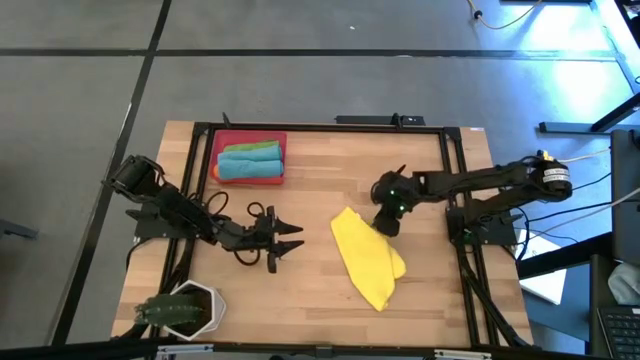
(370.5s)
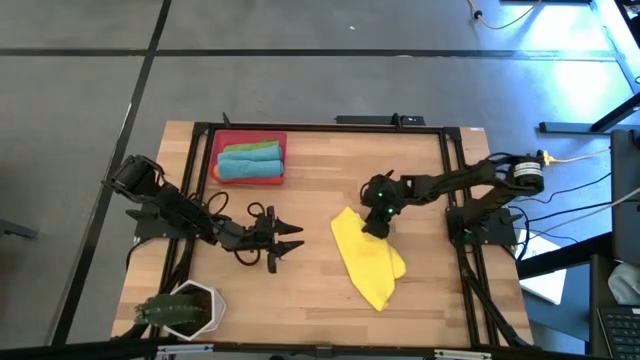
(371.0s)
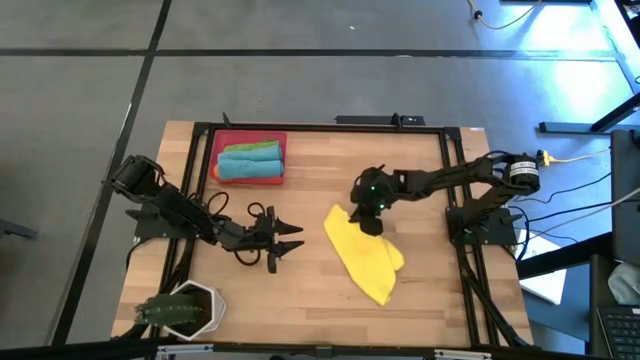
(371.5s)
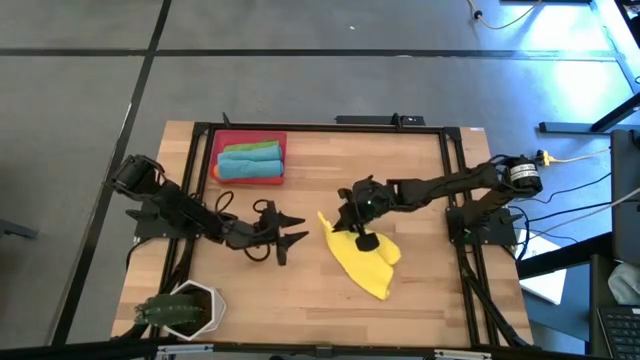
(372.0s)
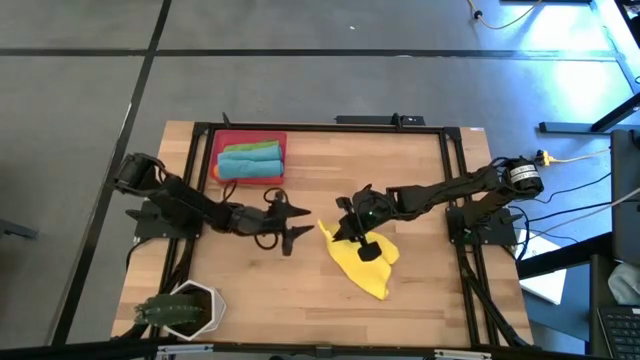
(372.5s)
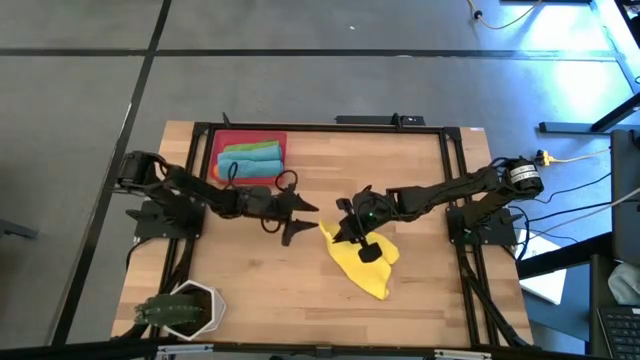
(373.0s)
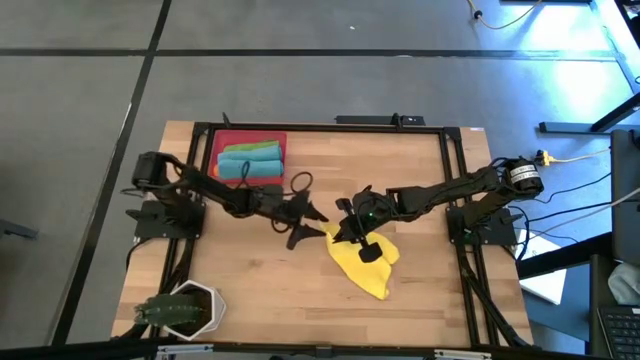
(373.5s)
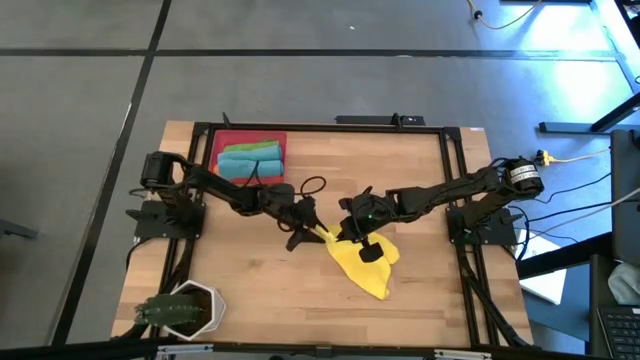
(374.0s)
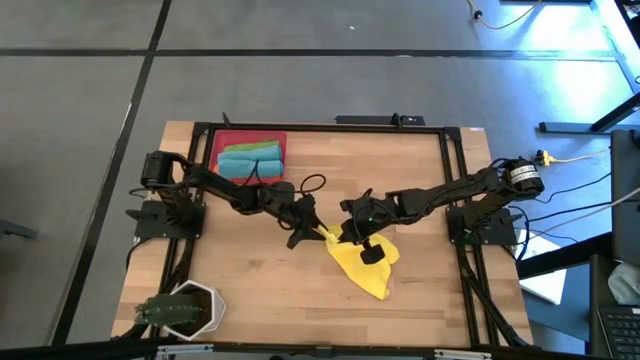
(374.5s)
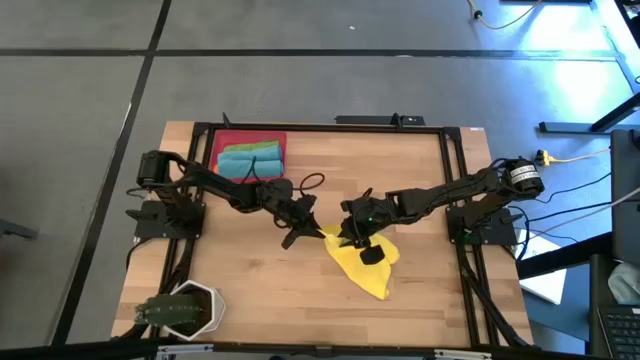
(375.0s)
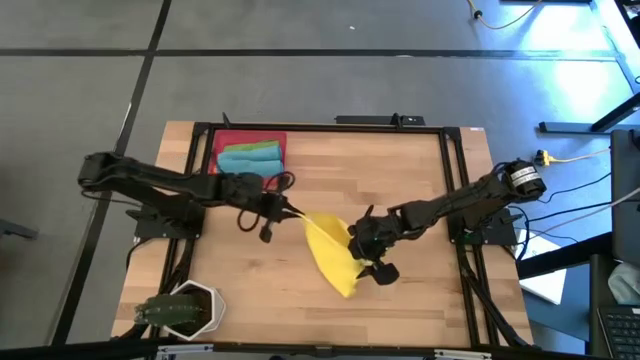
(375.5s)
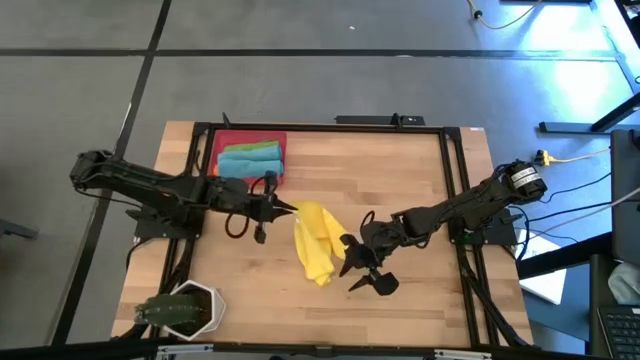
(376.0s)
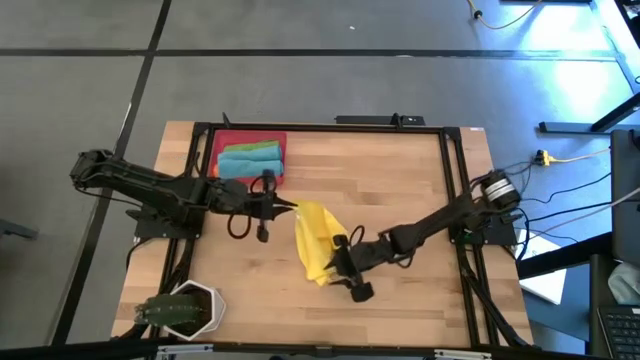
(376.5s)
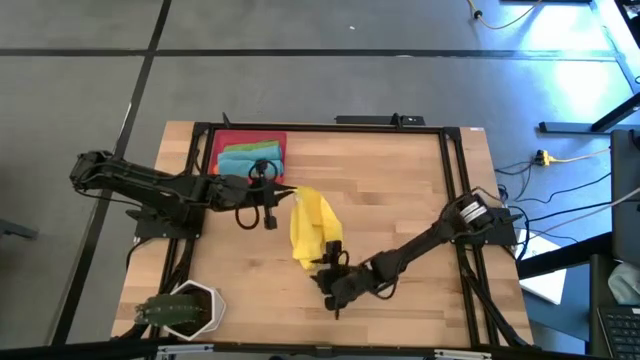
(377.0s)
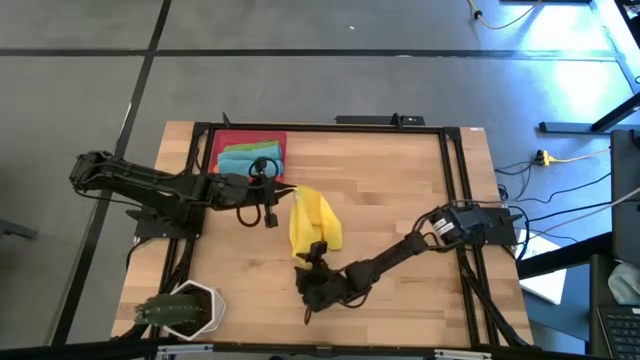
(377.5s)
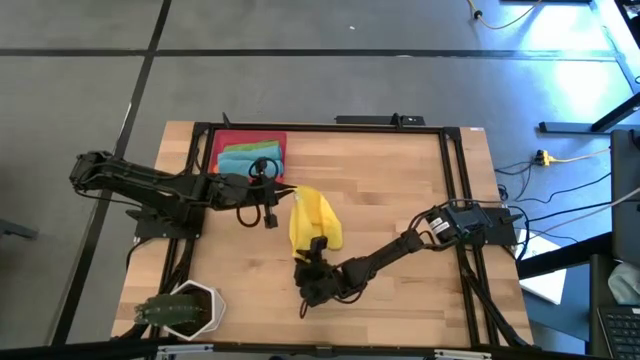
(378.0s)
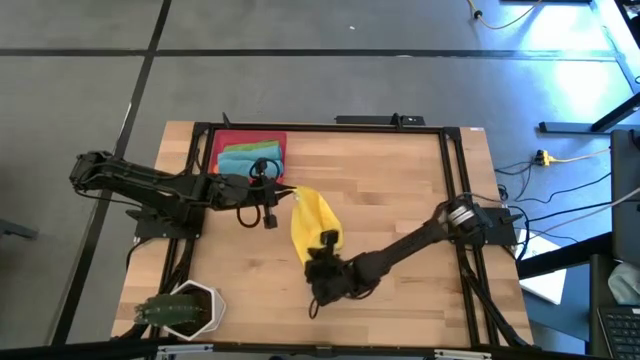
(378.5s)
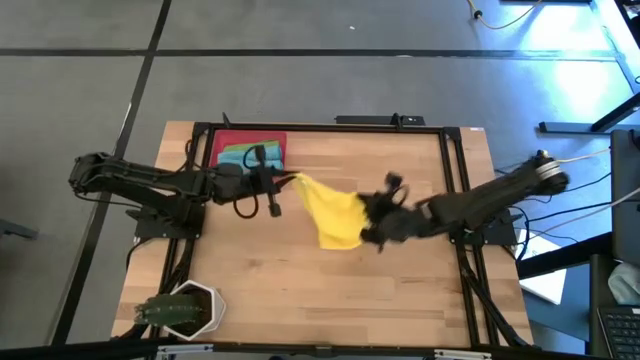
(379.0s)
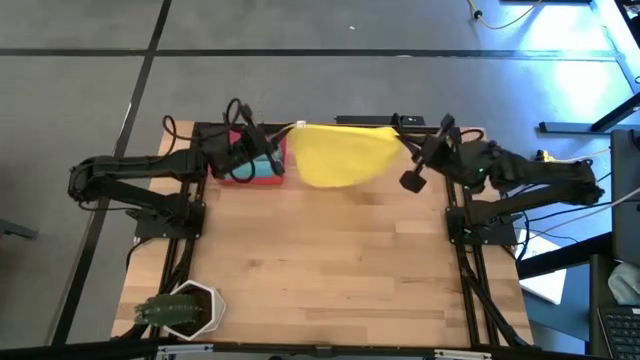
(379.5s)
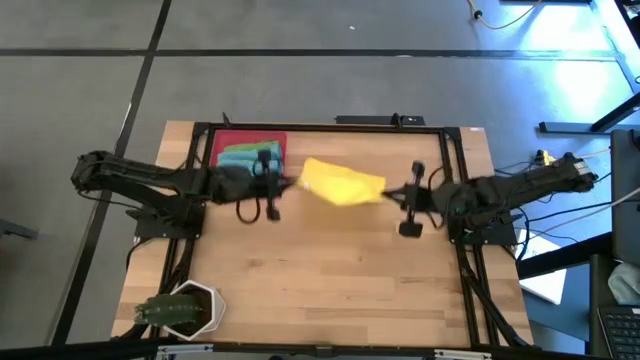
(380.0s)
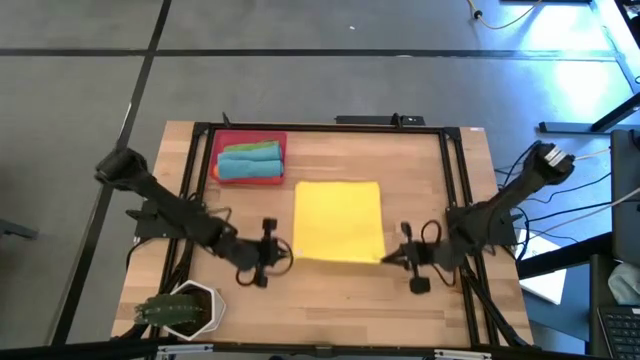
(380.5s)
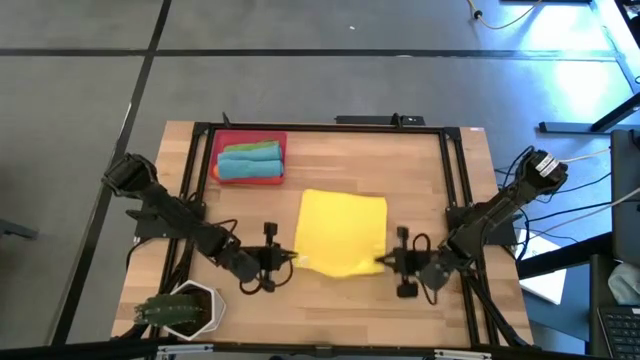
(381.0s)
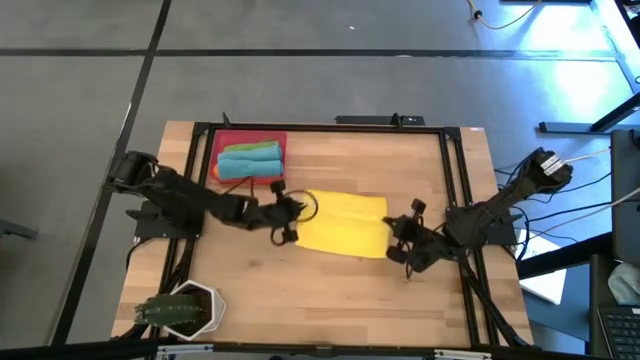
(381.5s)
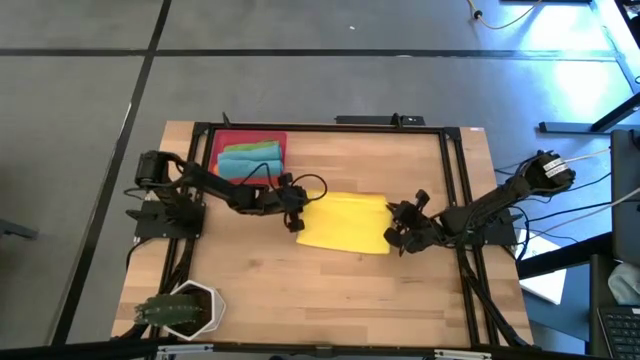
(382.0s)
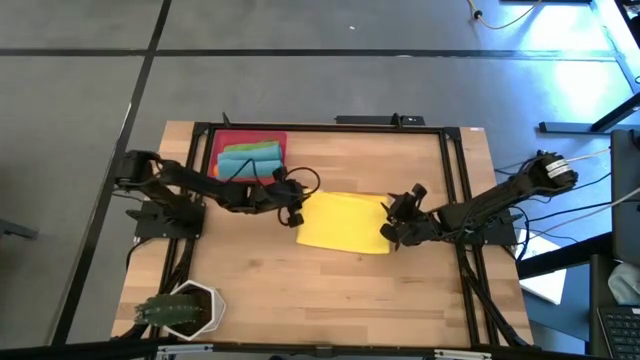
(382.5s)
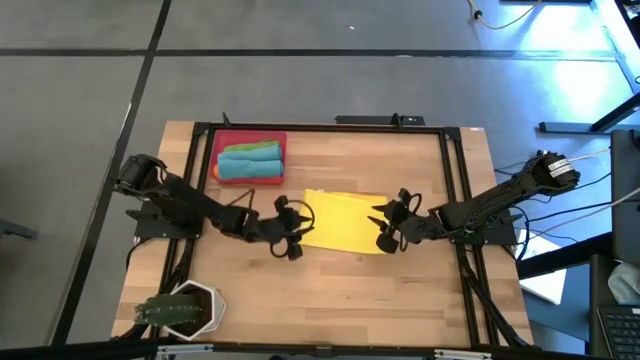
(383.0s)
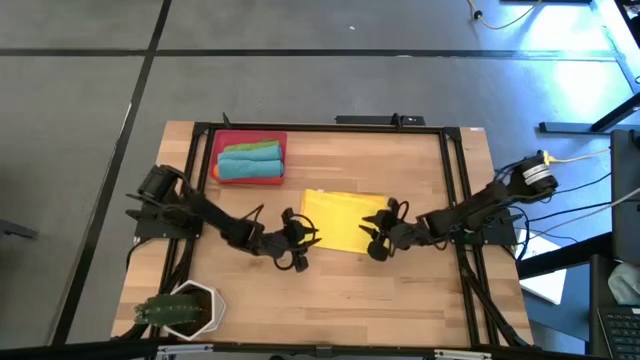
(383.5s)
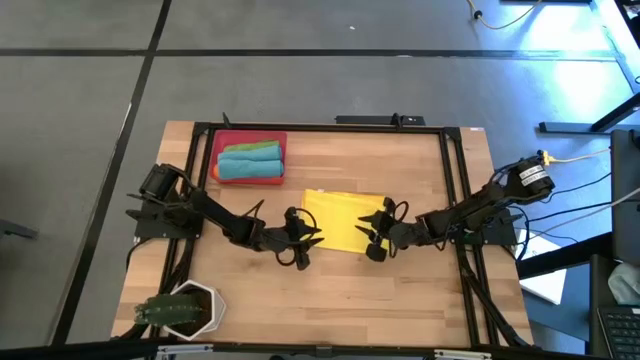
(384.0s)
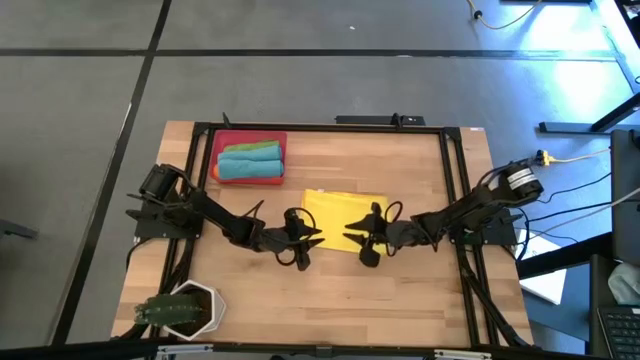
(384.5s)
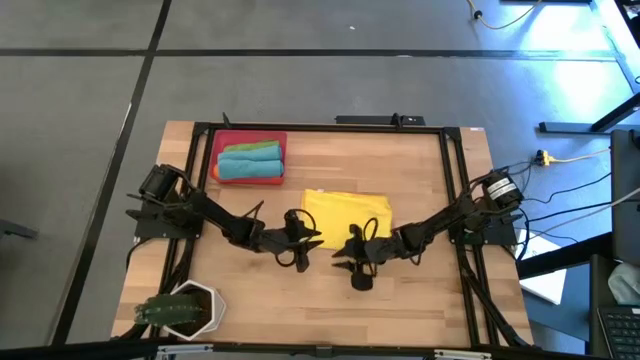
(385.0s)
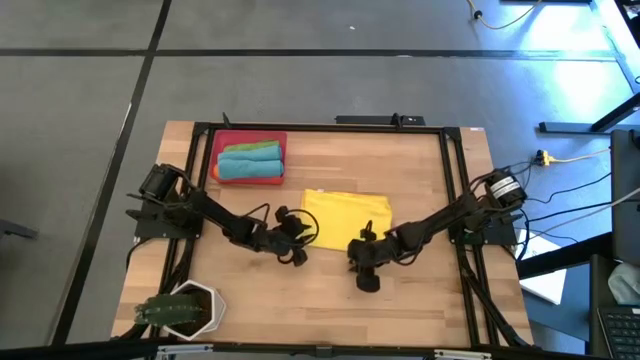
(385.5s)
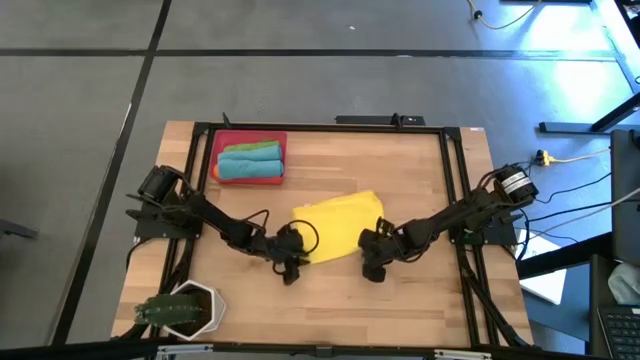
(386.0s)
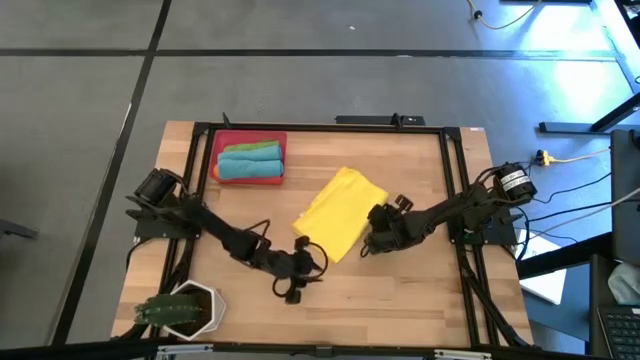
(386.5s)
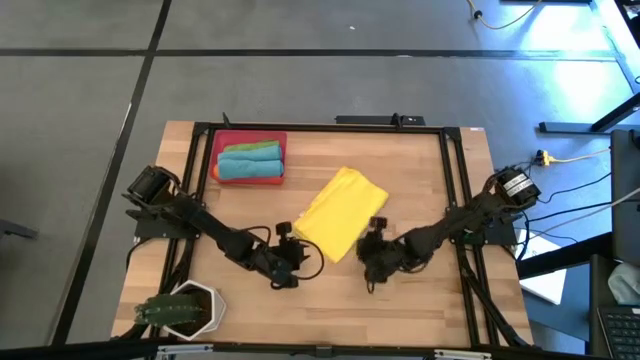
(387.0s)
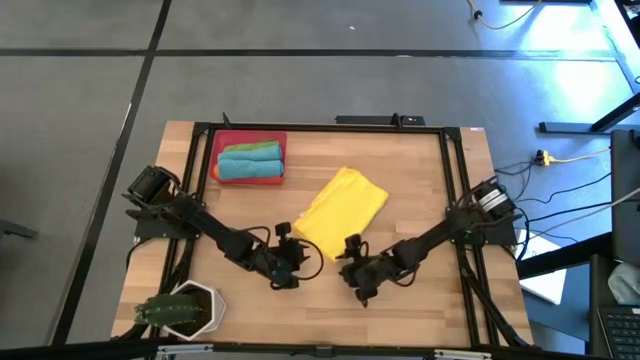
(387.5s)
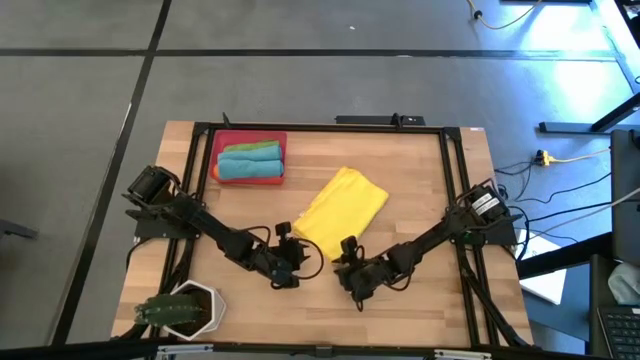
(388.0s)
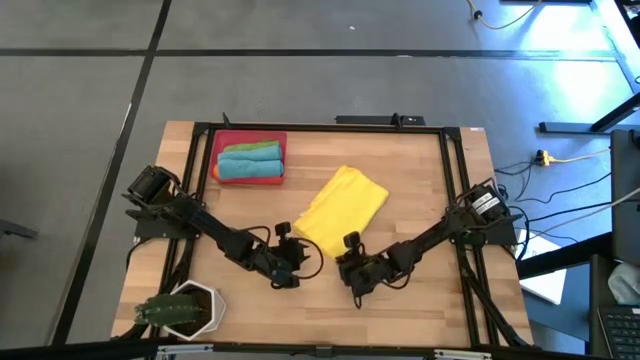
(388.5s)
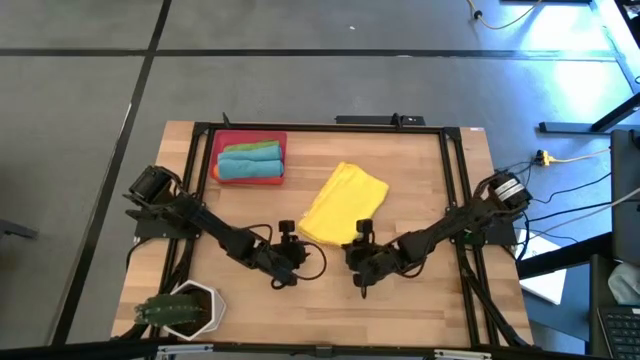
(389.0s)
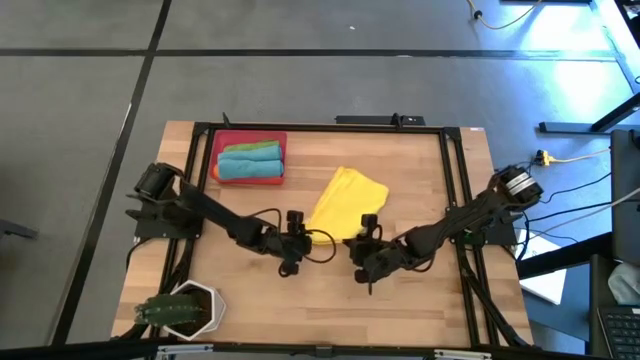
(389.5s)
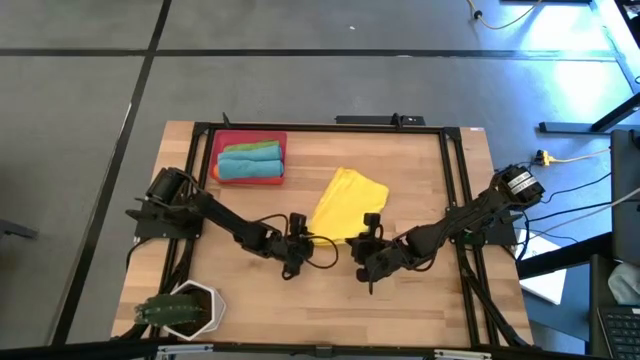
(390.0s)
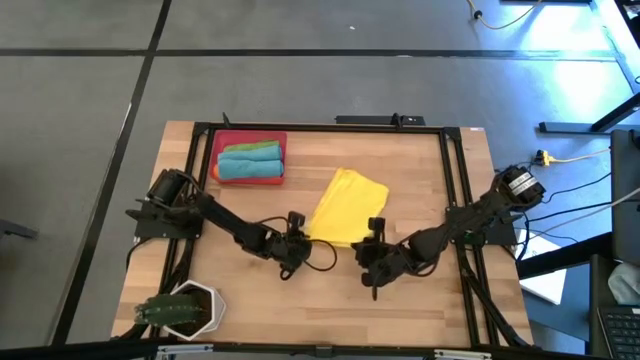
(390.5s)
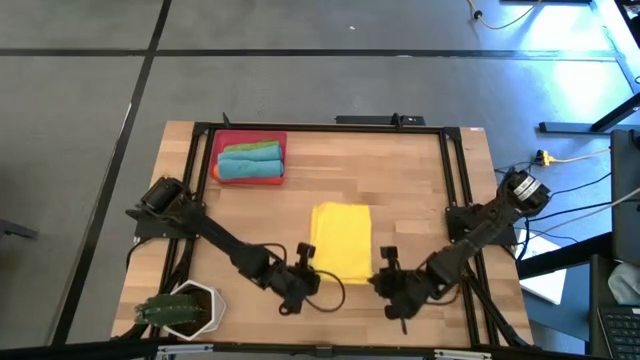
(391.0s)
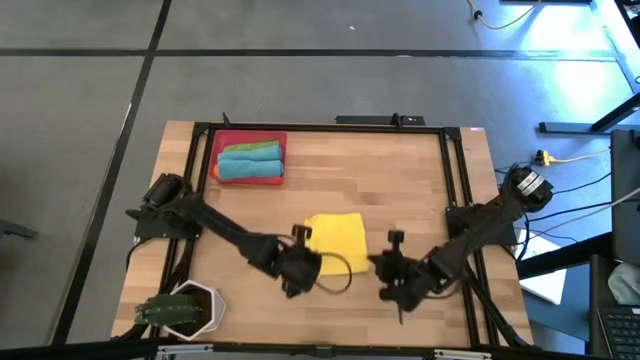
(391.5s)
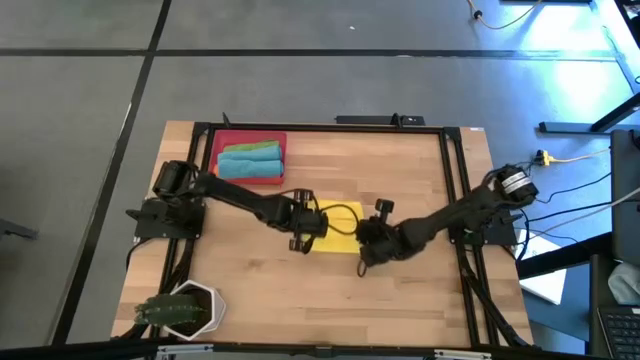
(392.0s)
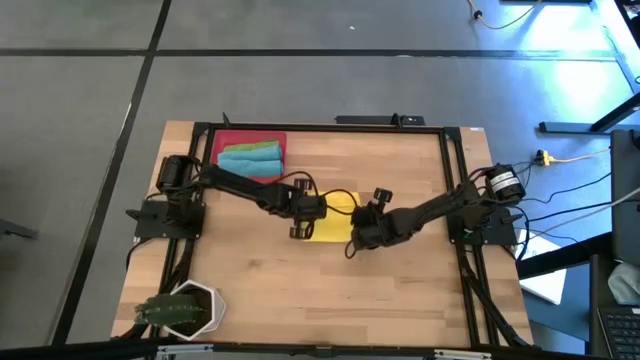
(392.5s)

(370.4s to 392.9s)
Task: Roll microfiber towels into tight, uniform cylinder then place into a basket
Fold the yellow microfiber towel
